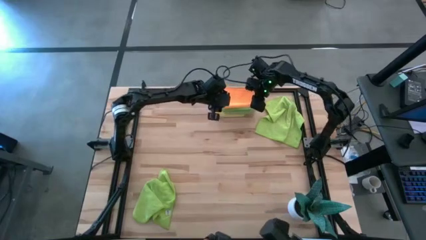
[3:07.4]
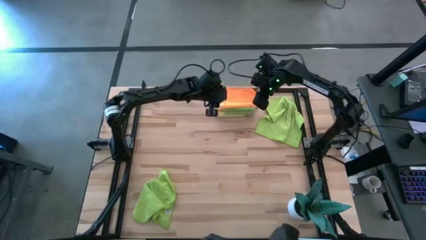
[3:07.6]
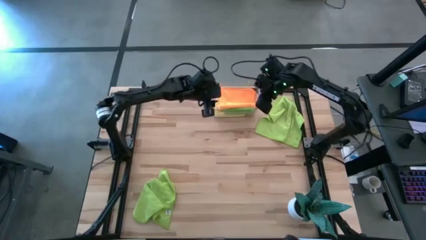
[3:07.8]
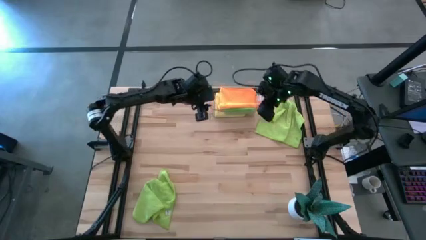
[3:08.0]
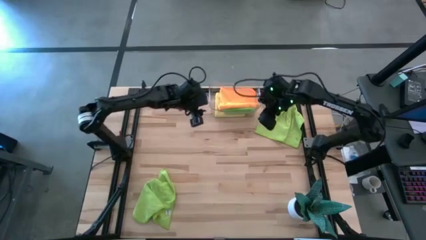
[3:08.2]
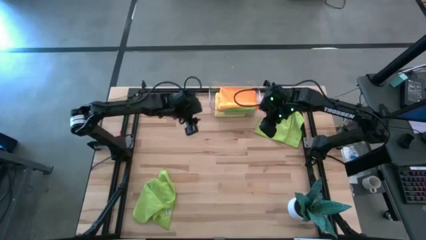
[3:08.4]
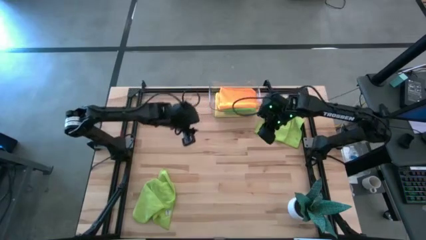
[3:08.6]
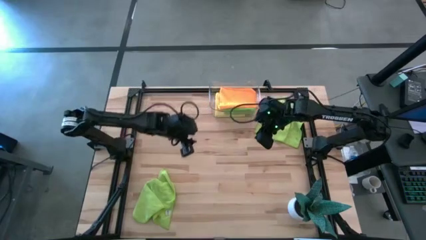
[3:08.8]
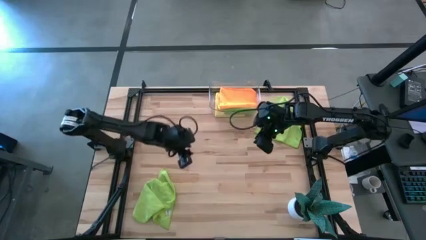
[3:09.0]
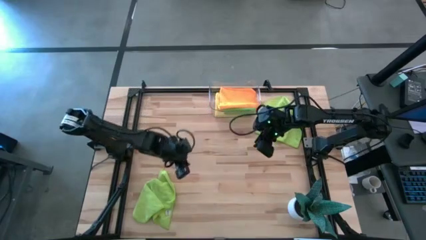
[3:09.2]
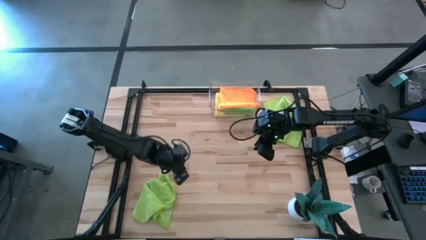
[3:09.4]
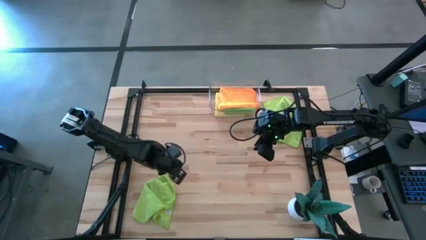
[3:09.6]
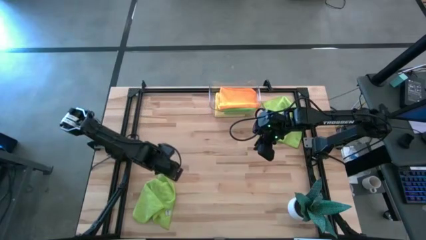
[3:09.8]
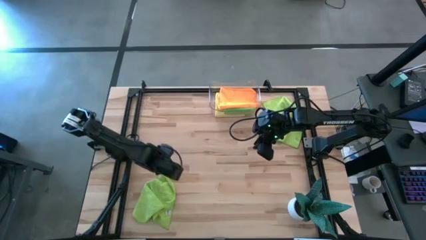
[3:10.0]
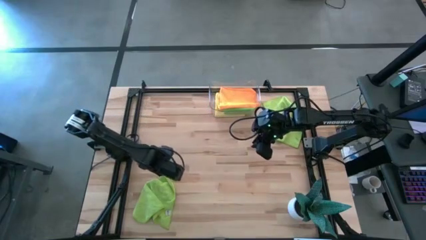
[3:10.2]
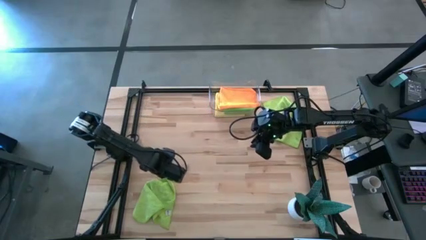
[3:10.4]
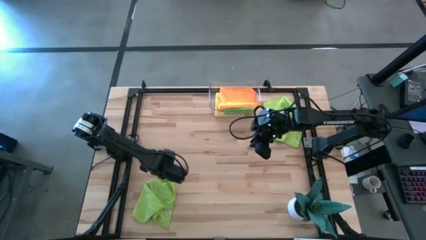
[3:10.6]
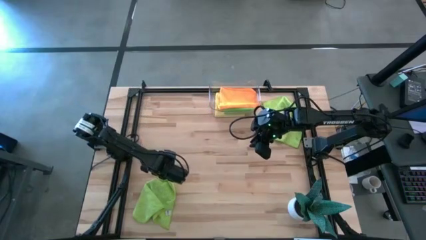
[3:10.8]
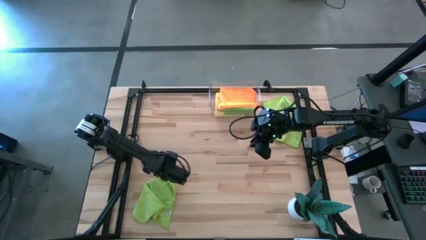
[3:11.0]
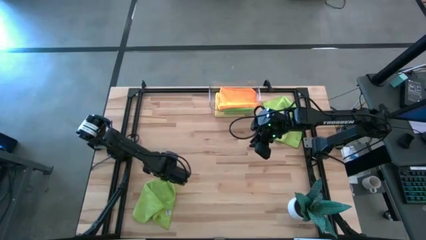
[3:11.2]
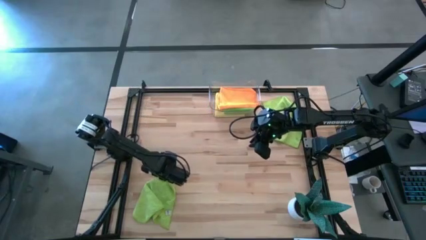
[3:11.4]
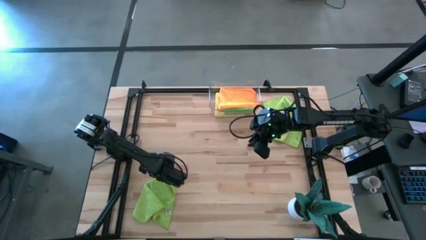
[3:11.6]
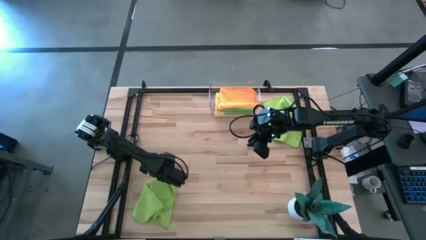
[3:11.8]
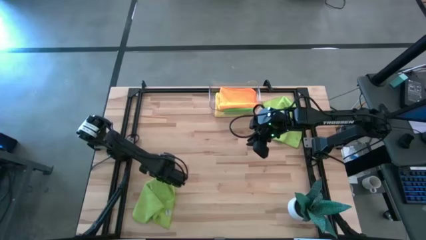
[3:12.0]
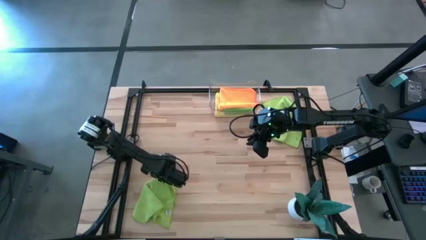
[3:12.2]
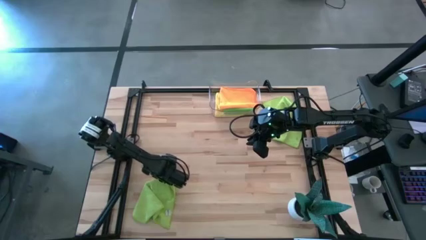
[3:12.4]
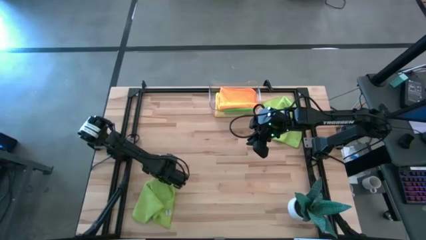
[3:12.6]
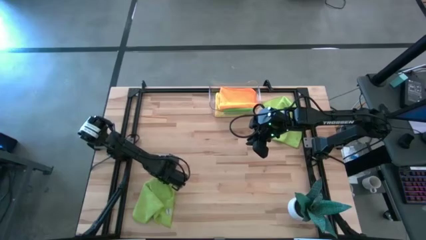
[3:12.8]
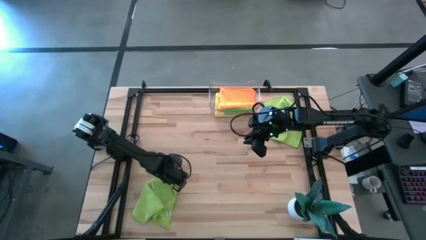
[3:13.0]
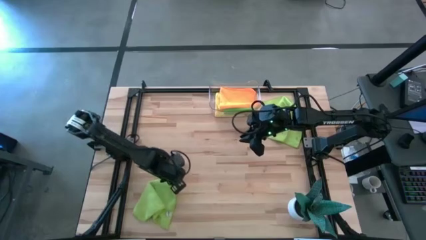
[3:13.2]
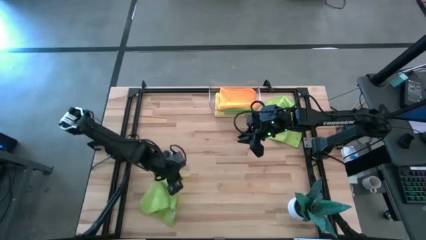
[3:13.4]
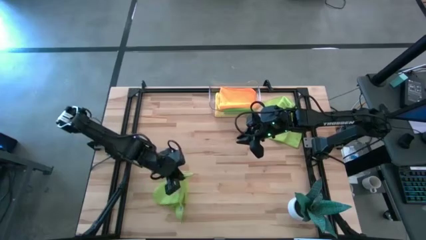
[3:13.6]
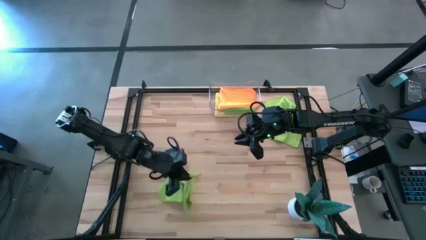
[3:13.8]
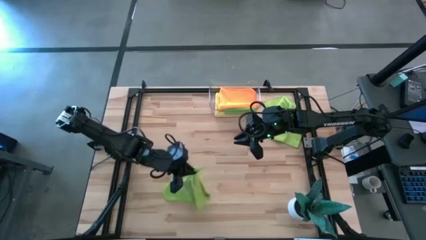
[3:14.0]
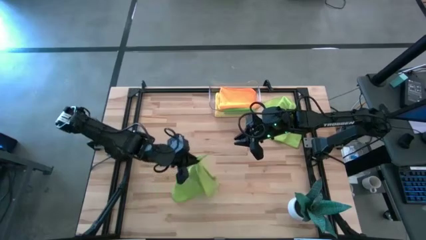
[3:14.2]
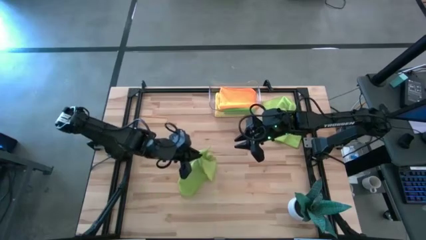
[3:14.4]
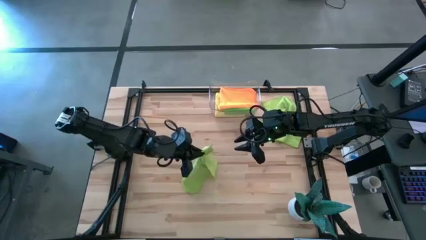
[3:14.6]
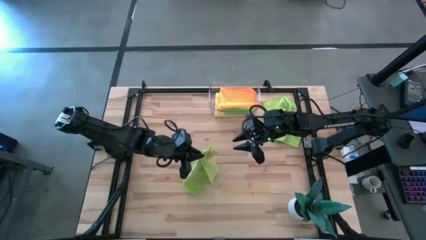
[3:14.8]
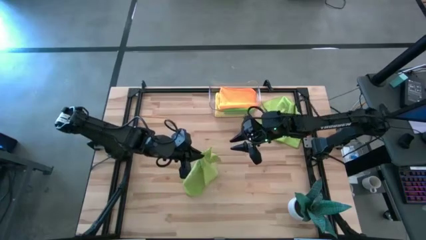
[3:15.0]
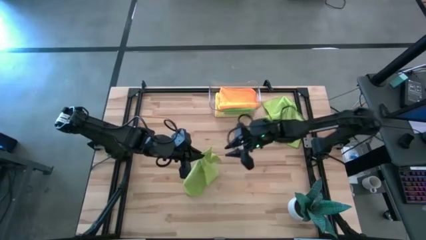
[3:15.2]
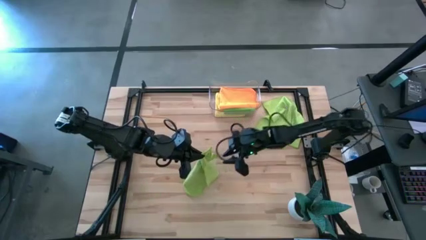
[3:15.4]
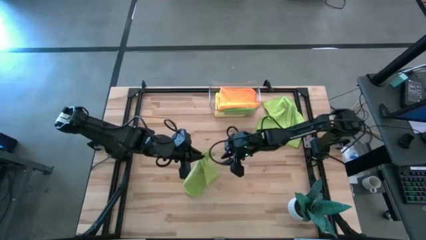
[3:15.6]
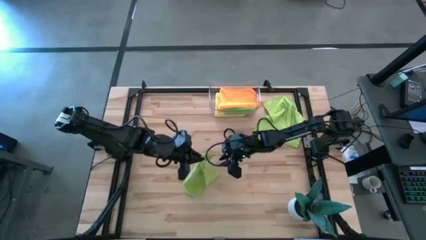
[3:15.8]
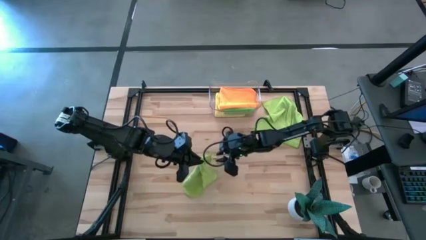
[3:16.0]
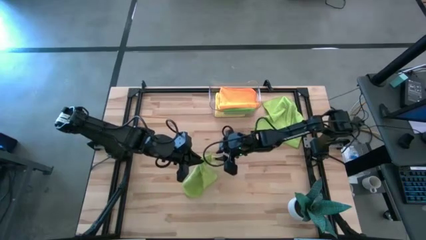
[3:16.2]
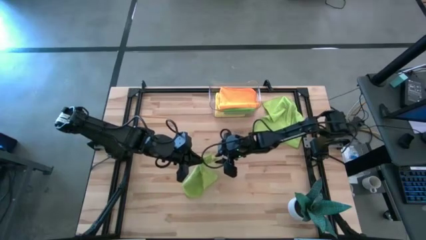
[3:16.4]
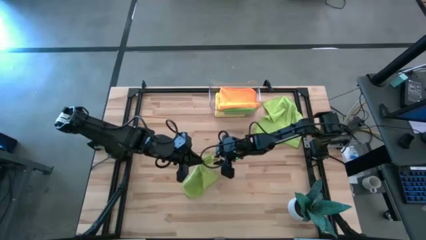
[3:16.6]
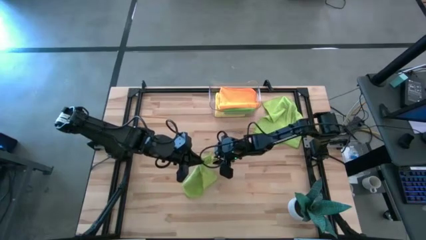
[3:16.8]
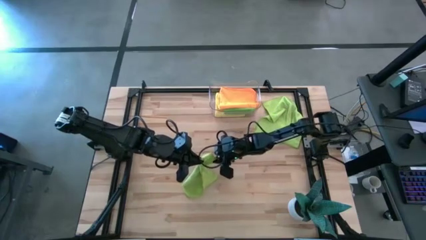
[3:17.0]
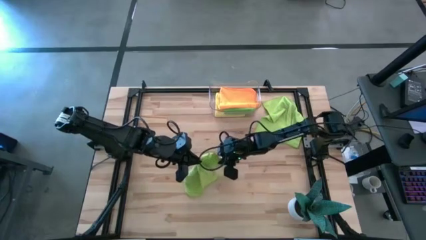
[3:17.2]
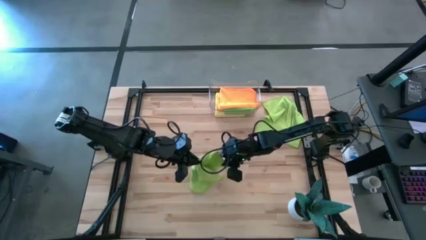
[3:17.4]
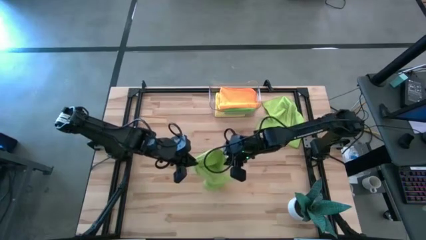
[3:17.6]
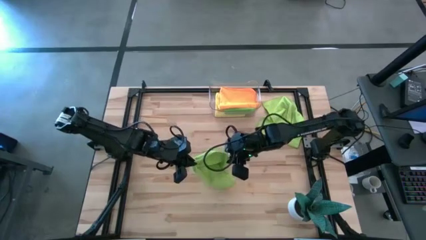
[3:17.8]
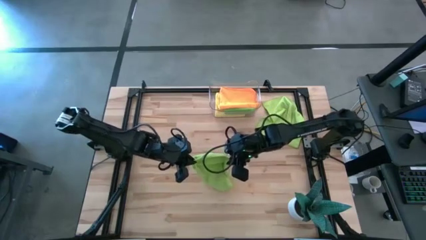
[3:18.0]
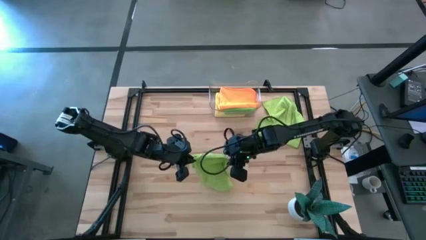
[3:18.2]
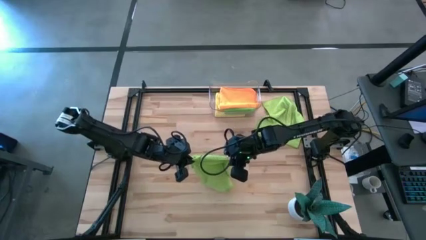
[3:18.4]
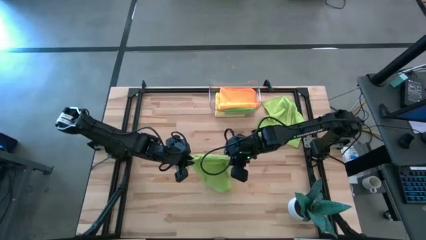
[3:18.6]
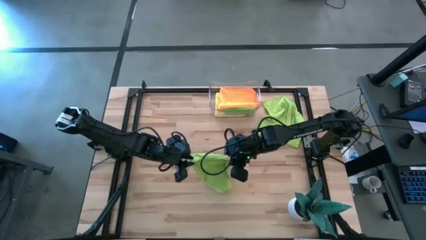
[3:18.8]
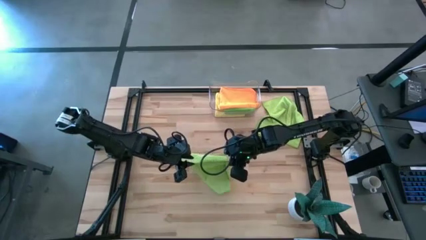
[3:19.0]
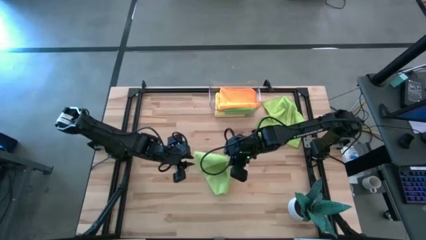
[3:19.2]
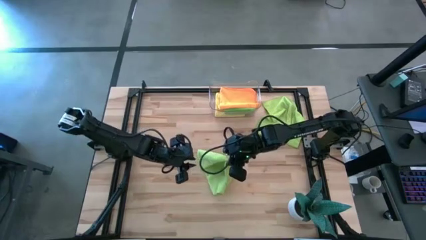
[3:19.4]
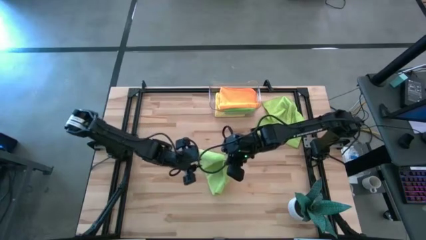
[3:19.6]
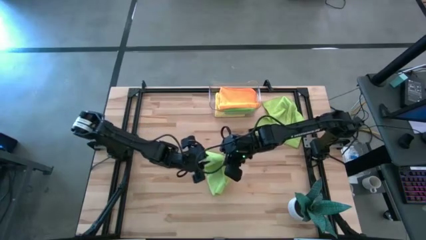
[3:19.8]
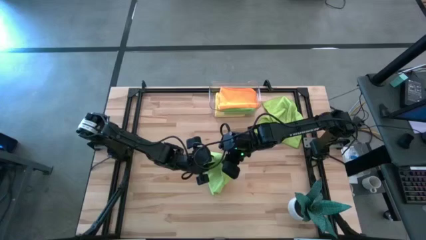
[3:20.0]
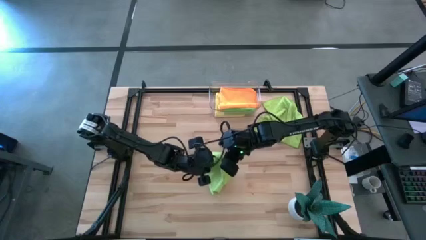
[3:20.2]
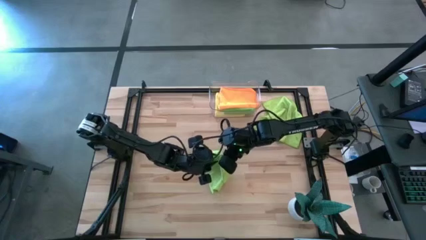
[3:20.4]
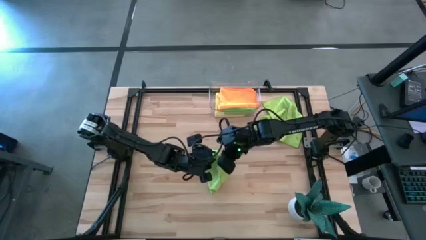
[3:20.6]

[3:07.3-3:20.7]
Task: Fold microfiber towels
Fold the light green microfiber cloth
